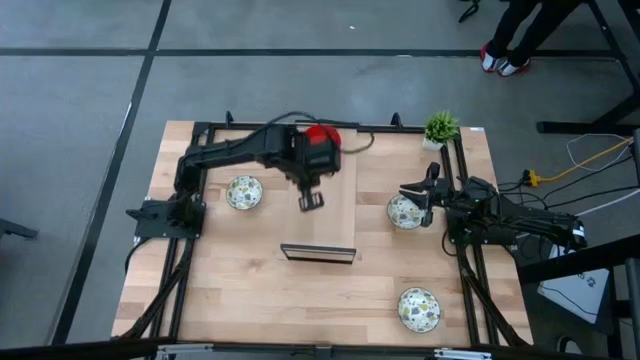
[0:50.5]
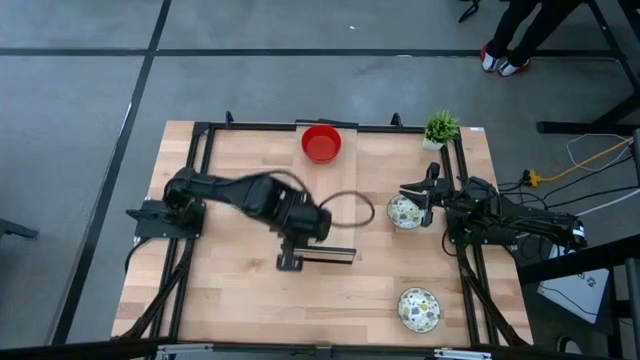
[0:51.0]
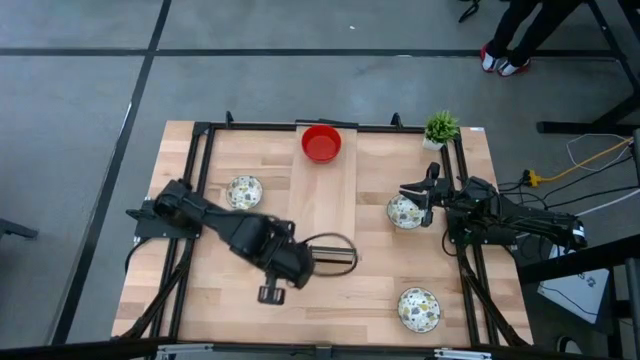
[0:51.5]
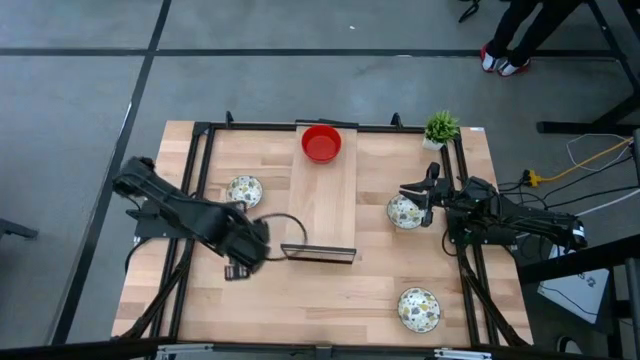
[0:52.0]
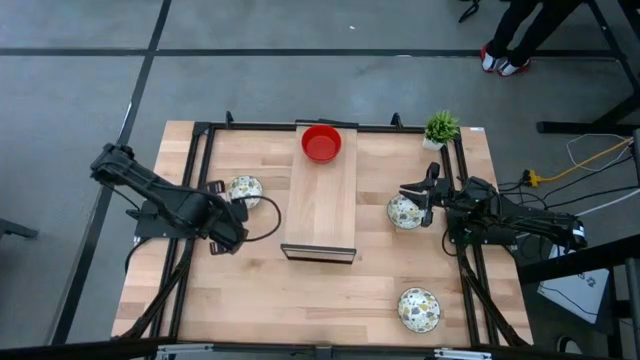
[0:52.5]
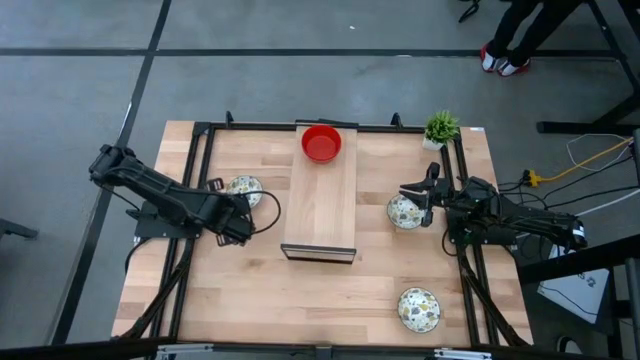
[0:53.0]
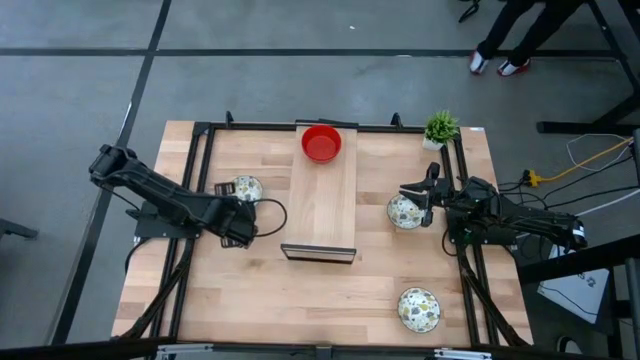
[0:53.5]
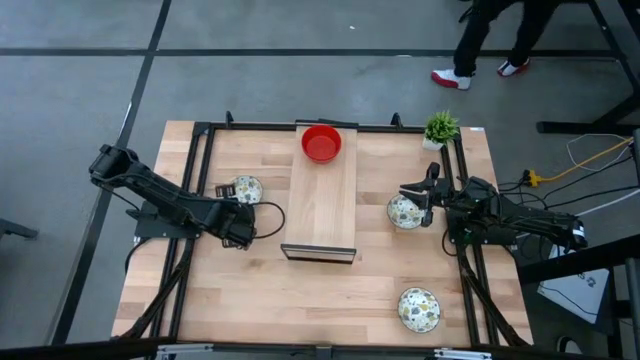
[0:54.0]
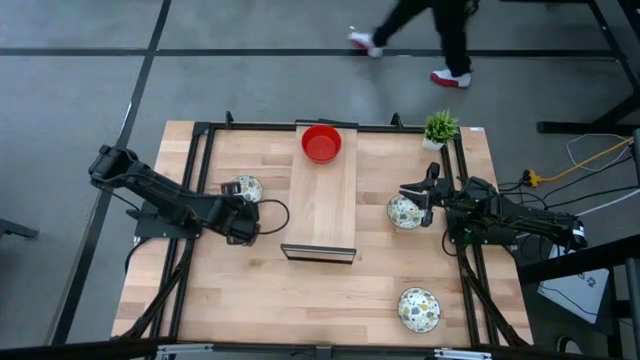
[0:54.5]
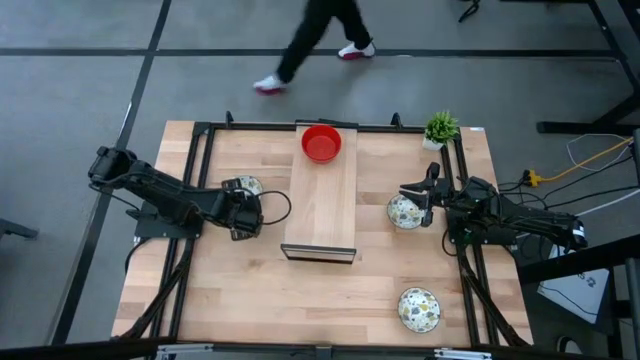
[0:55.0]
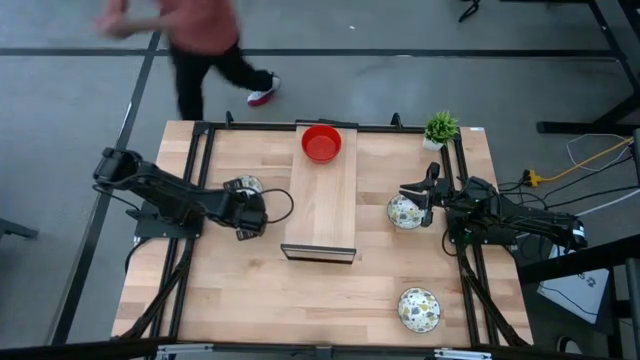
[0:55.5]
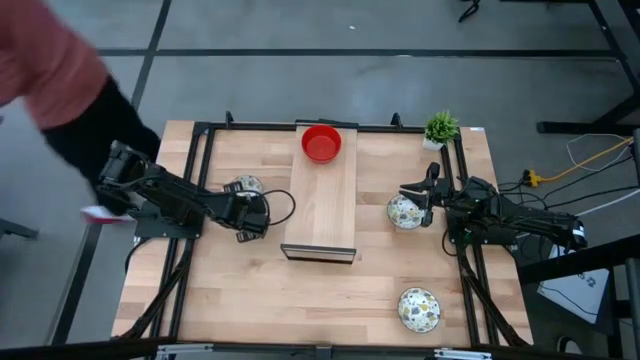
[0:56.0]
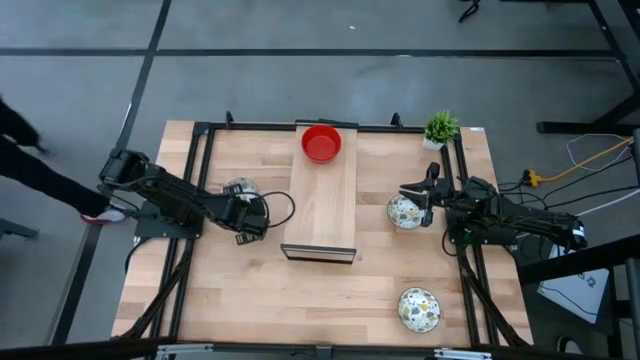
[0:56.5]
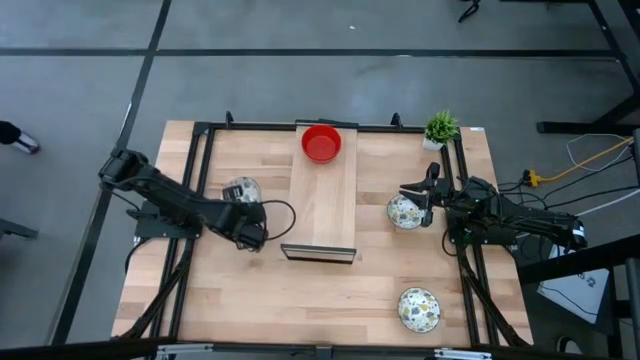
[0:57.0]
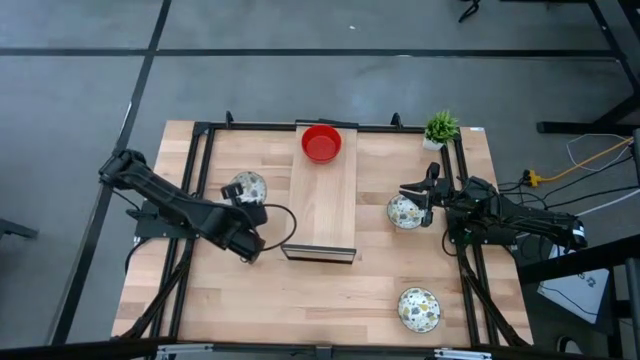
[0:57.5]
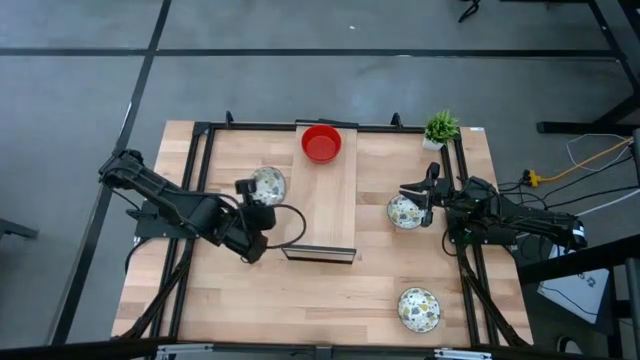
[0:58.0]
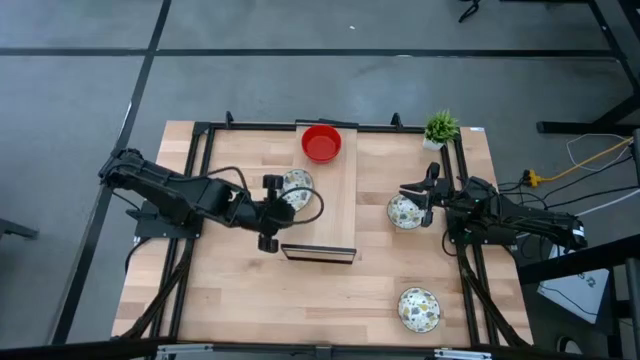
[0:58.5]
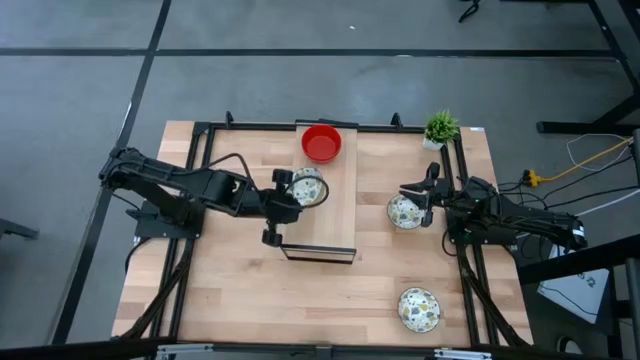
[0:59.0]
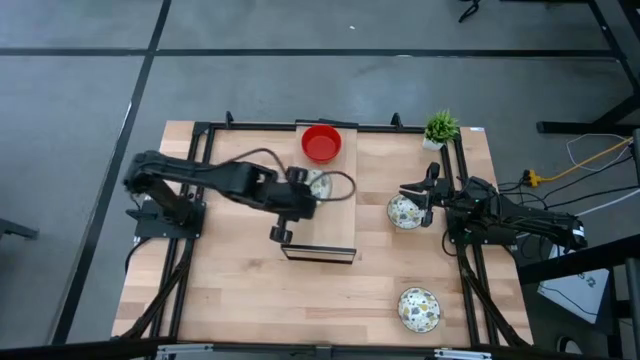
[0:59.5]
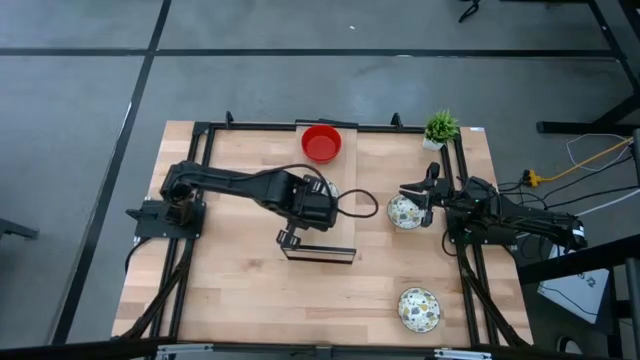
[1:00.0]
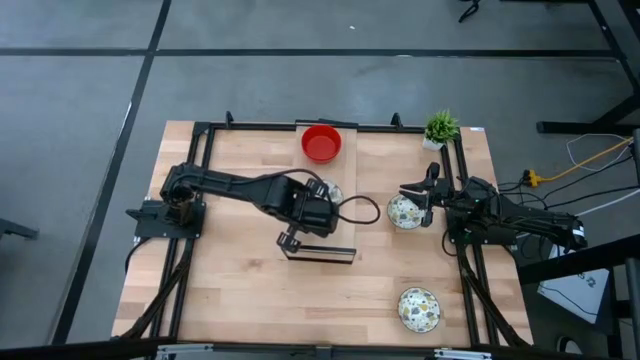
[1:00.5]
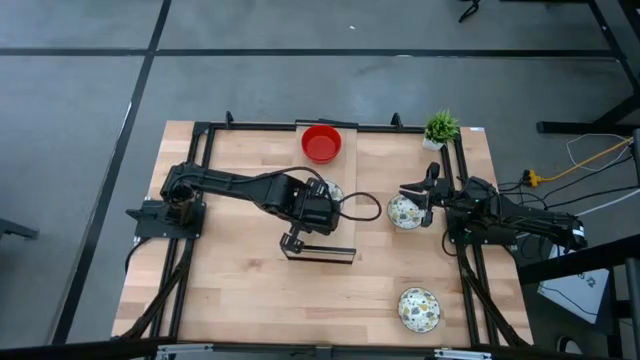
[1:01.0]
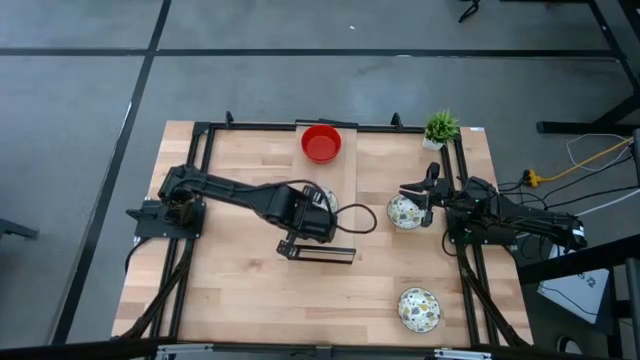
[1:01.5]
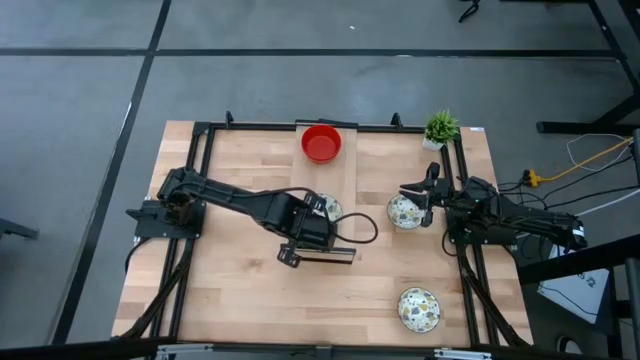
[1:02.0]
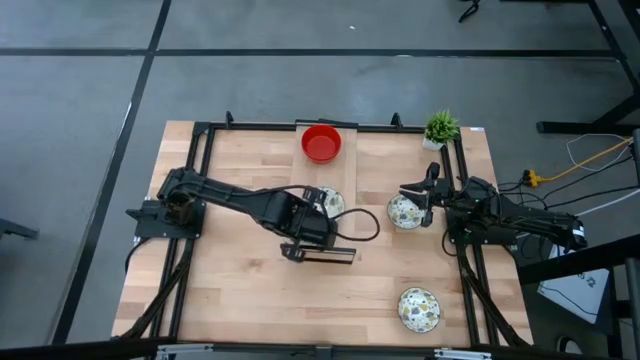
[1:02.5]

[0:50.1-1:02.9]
Task: Pick & Place Mini bowls
Put the left white bowl on the shelf

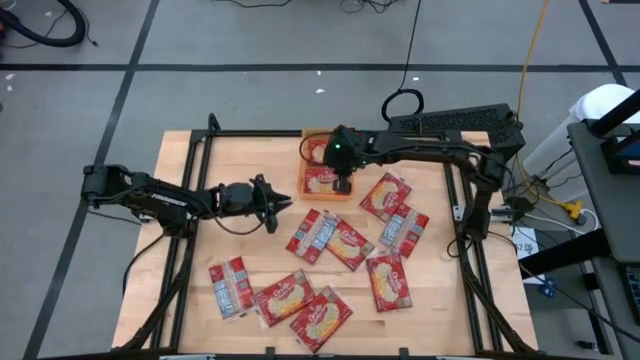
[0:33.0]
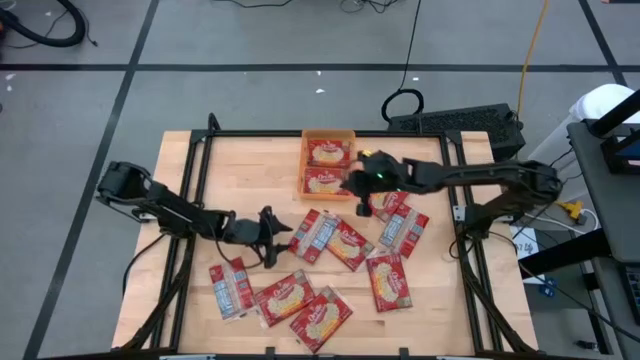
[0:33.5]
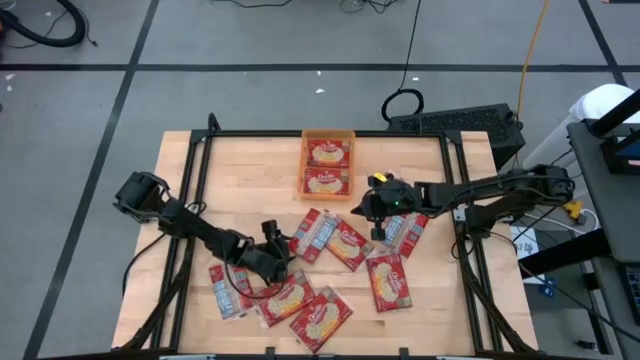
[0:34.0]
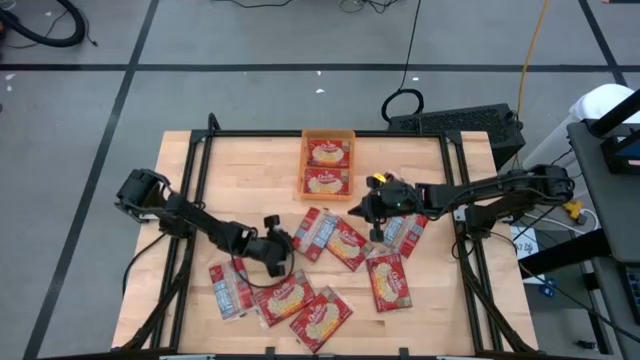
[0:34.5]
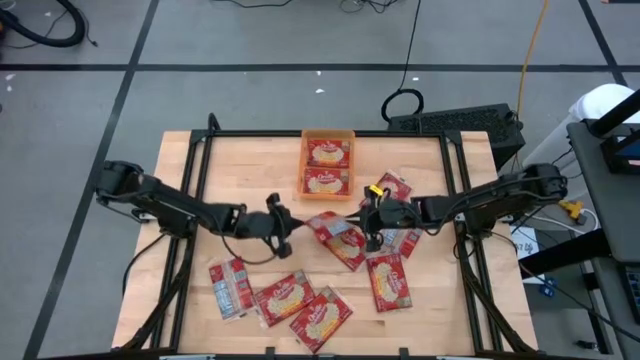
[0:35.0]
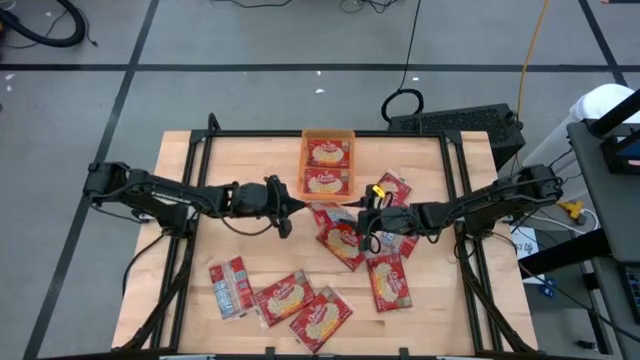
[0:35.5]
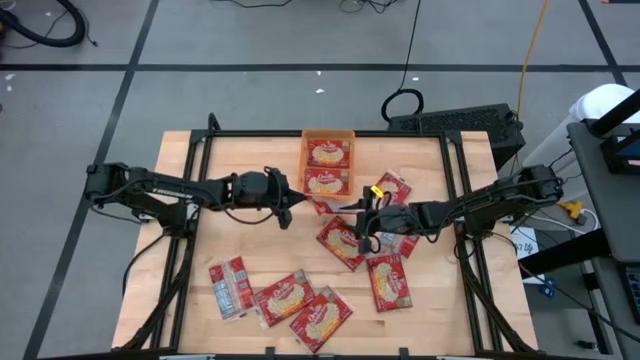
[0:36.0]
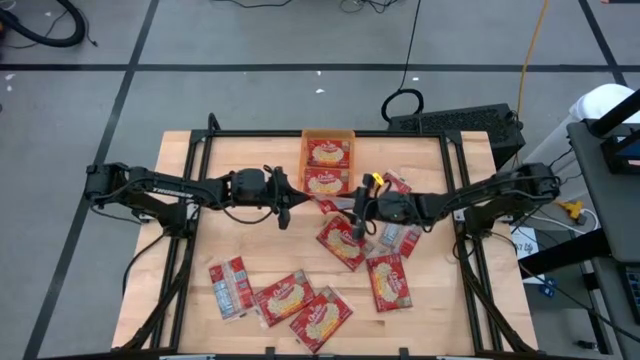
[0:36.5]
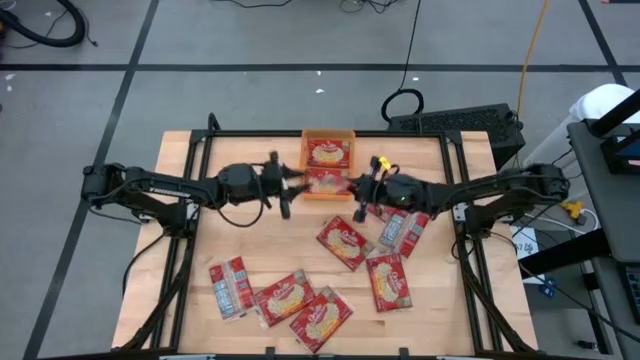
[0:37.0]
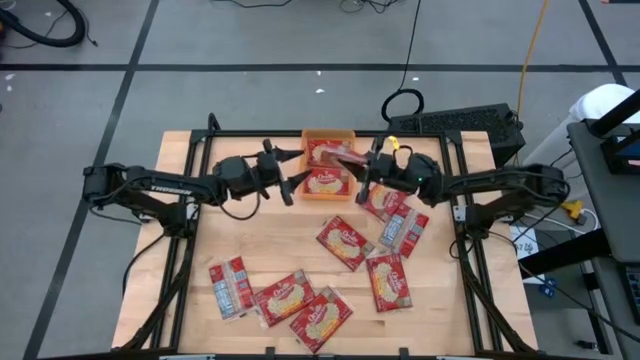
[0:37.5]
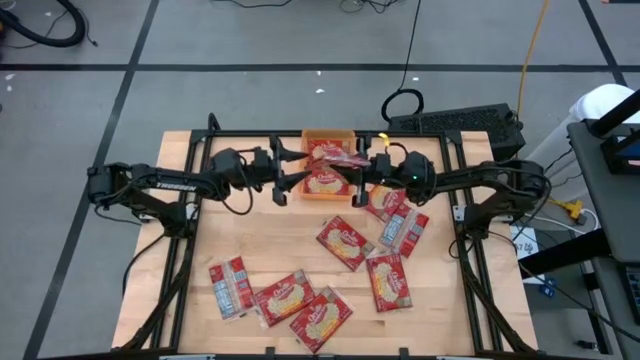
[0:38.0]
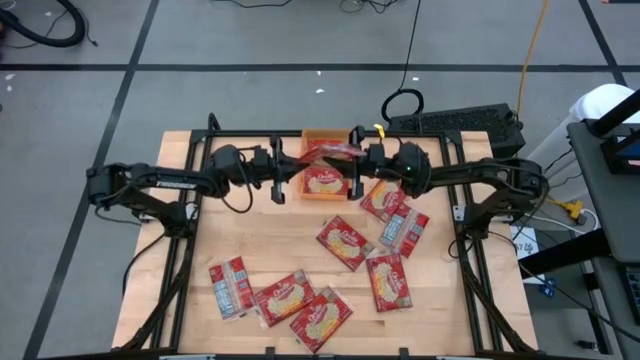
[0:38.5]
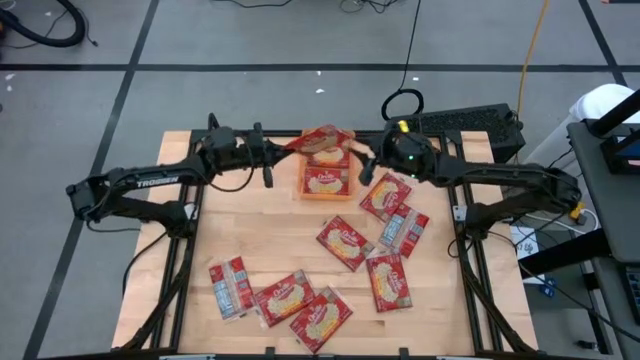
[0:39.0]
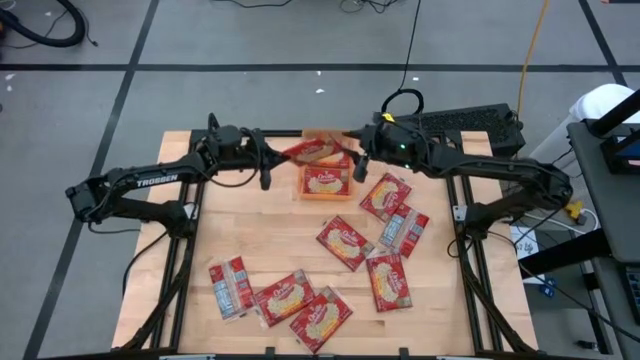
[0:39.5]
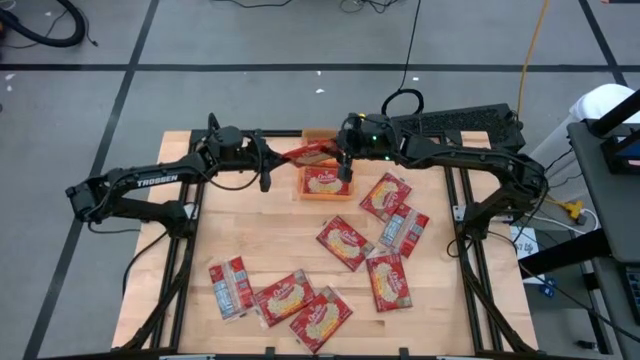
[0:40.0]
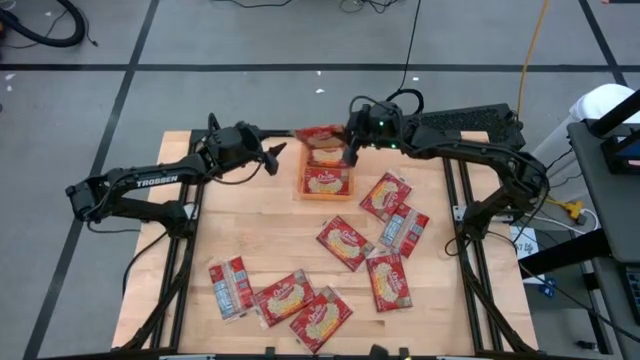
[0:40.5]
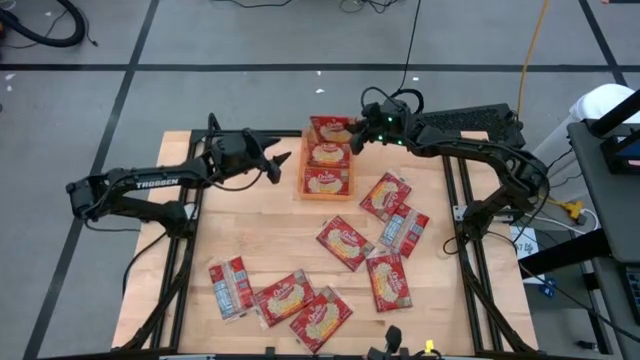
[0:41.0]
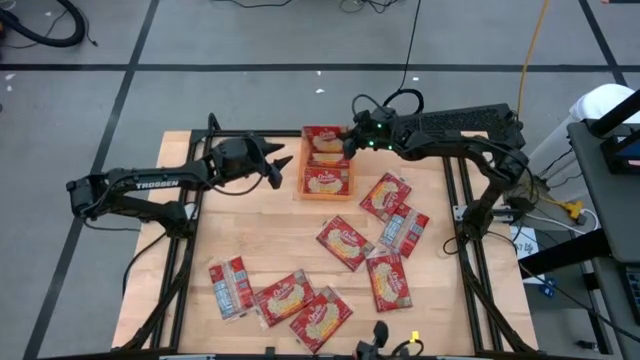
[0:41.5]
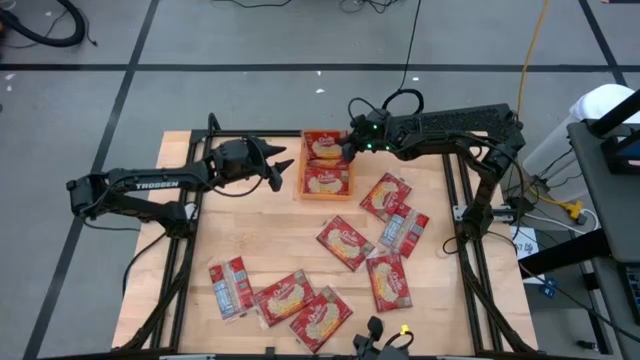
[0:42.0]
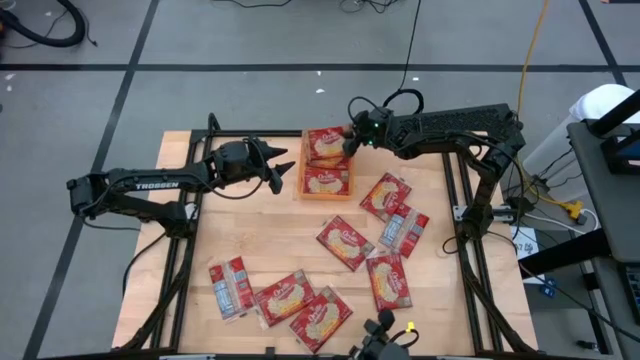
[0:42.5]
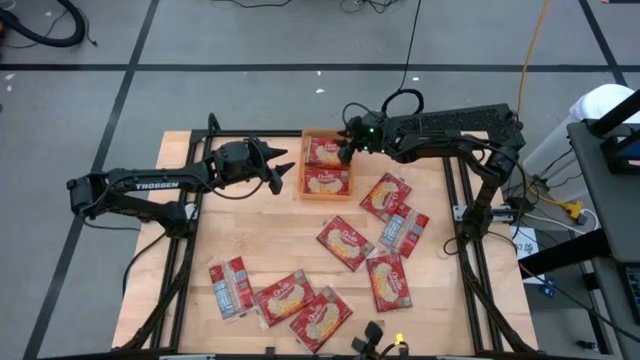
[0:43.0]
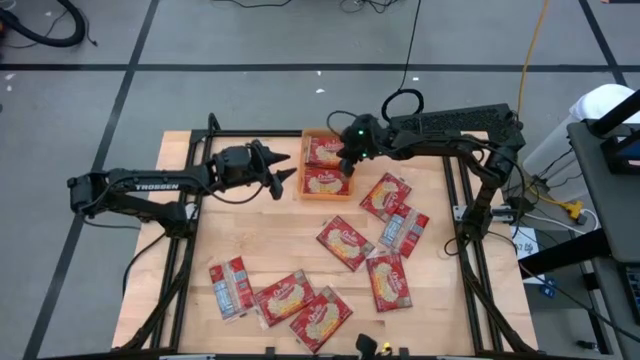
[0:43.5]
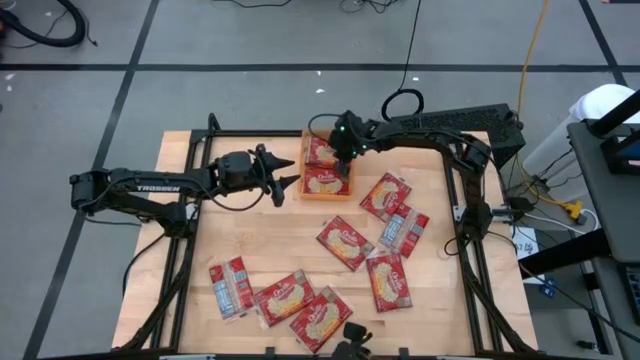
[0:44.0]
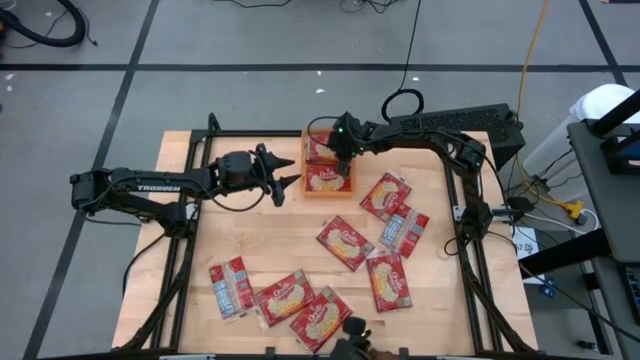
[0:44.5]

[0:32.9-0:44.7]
Task: Sort popcorn bags into baskets
Put the red popcorn bag into the orange bin
